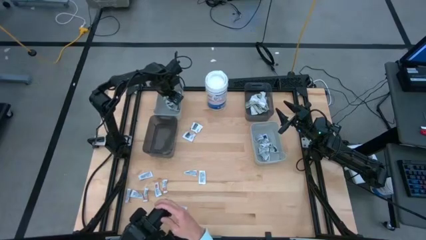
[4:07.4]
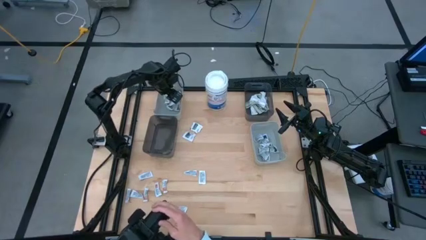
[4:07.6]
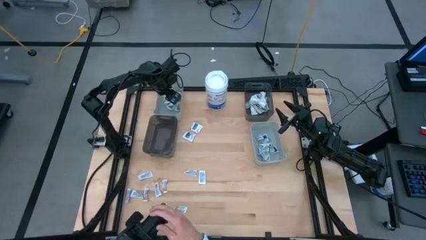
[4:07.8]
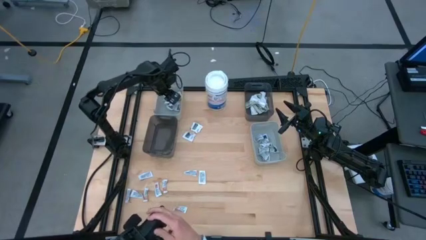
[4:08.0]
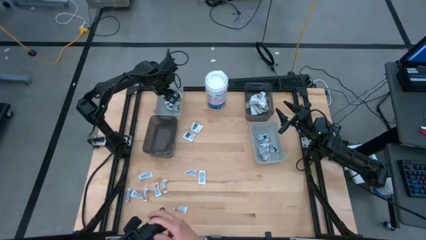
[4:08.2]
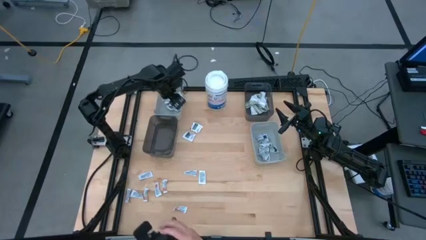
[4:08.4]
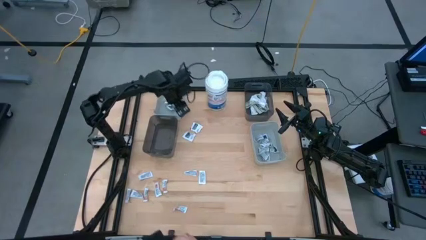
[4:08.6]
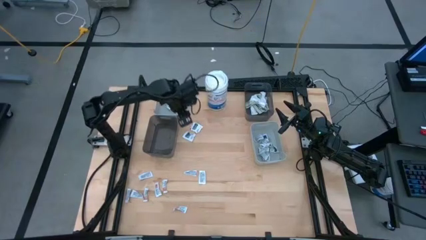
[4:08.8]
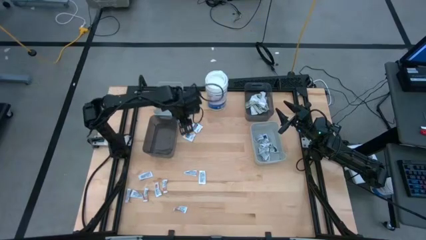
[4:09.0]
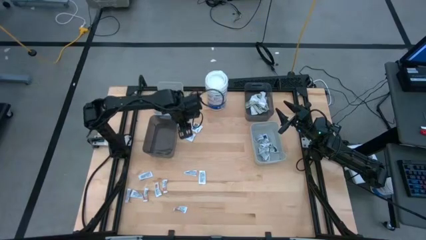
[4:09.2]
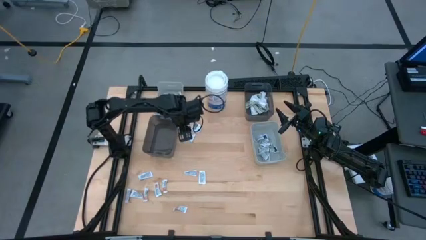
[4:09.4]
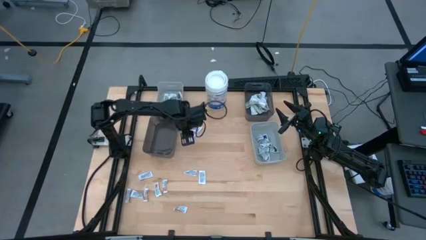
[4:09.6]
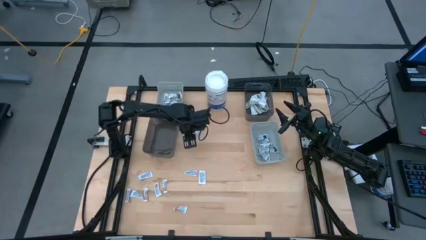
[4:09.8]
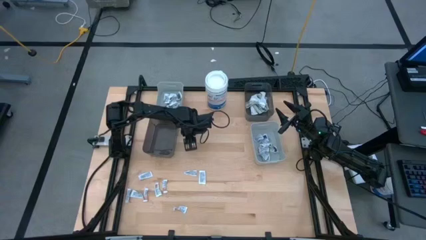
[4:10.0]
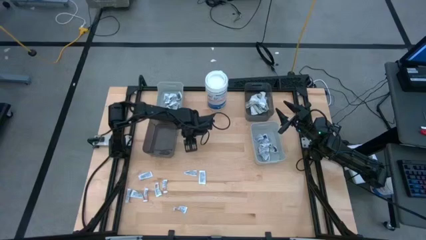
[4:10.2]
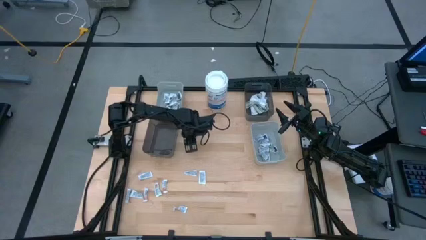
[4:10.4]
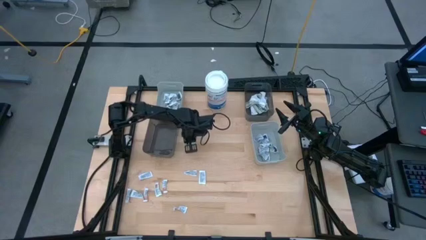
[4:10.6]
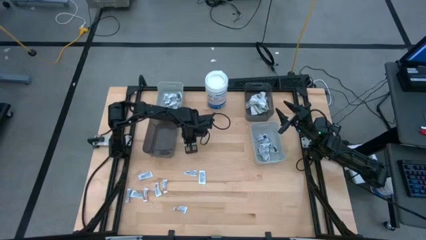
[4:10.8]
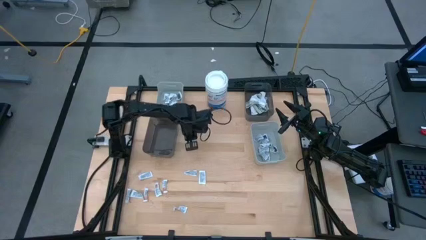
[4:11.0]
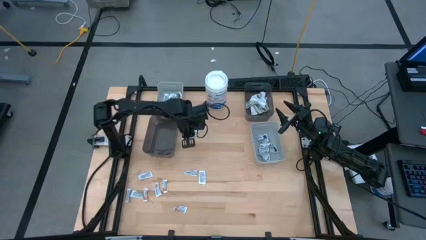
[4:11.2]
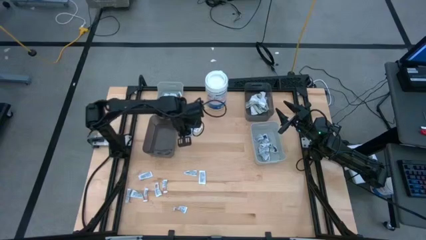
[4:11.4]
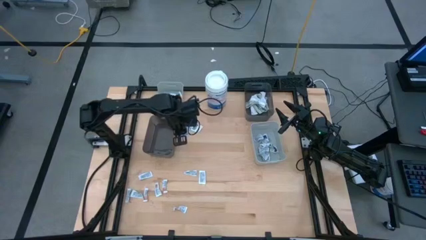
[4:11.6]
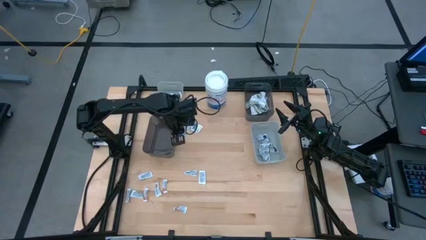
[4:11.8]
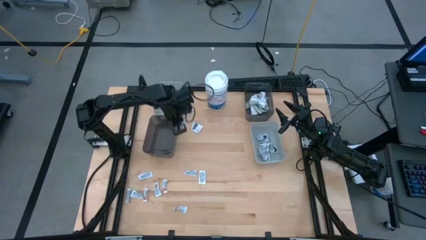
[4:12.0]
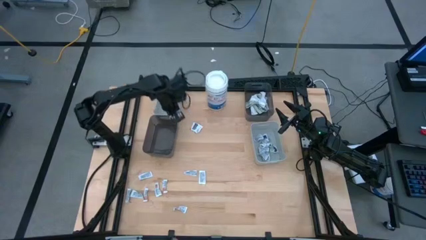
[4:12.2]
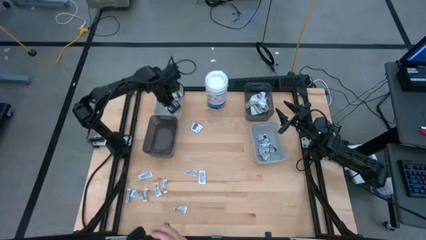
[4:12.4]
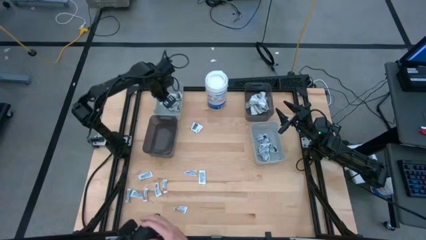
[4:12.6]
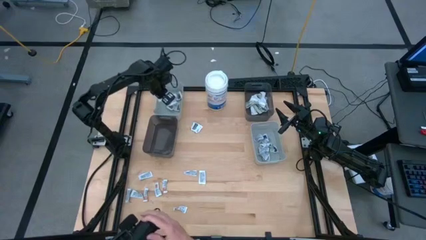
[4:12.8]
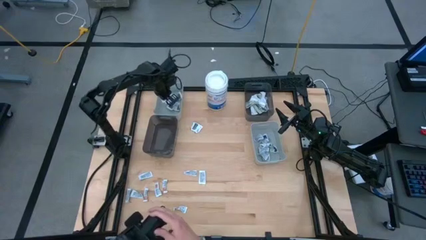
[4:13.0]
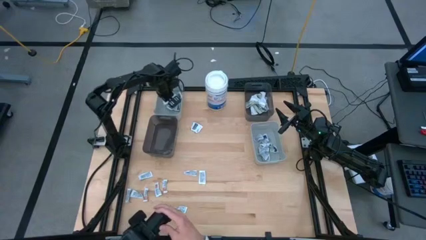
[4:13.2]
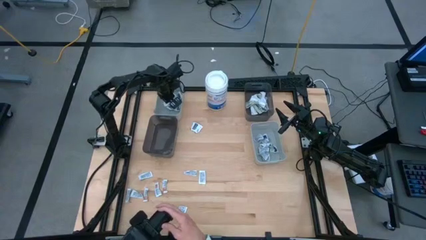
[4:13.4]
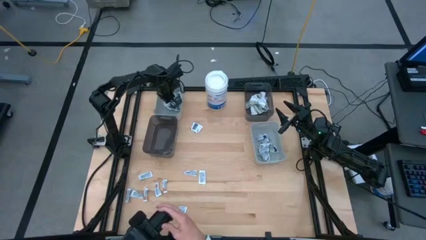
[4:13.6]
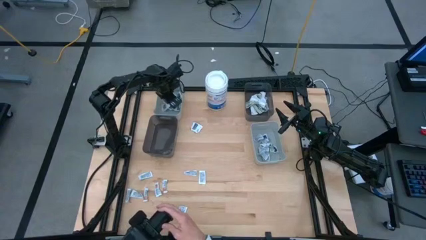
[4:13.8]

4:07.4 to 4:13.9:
Task: Pick & Place First Aid Supplies
Put the gray towelette pack into the left gray bin

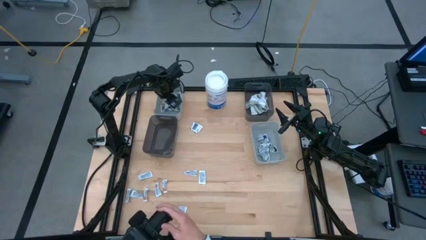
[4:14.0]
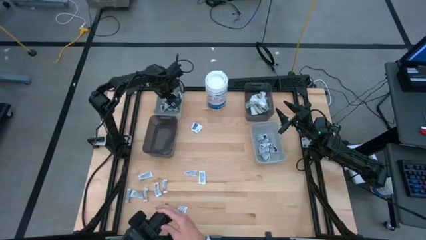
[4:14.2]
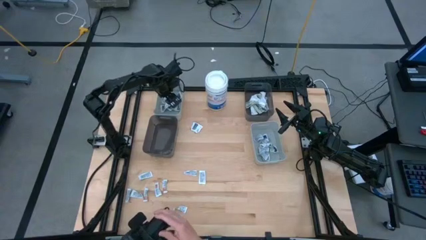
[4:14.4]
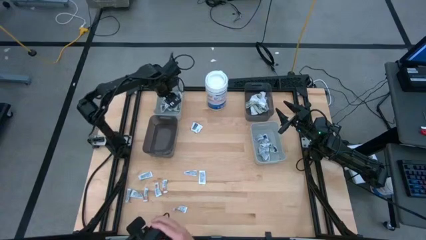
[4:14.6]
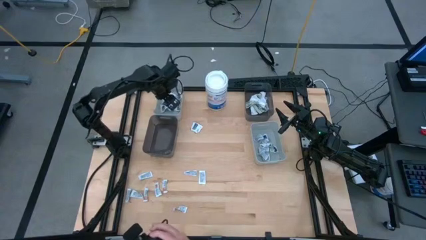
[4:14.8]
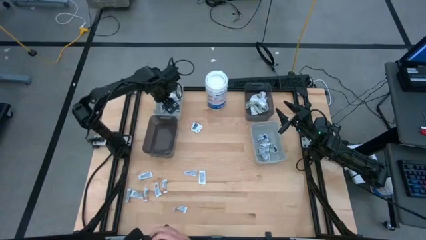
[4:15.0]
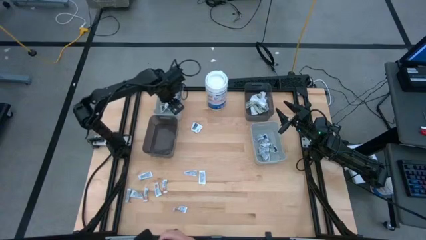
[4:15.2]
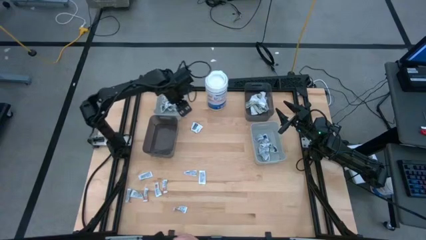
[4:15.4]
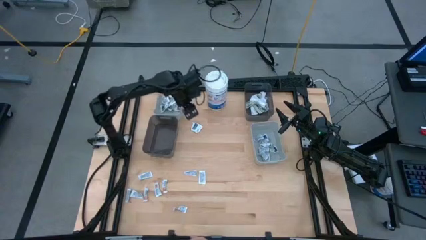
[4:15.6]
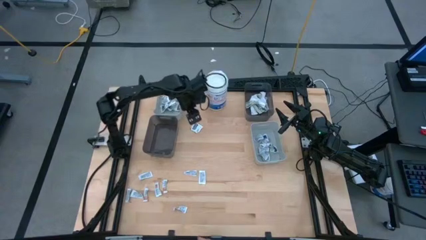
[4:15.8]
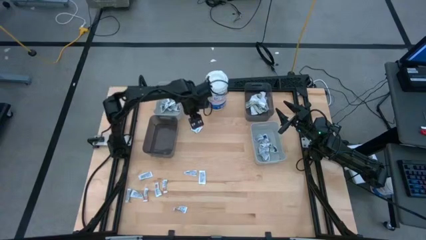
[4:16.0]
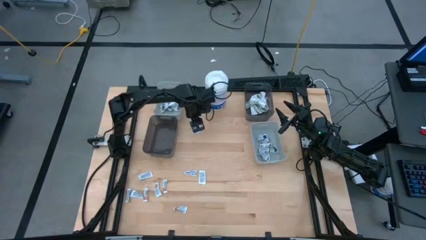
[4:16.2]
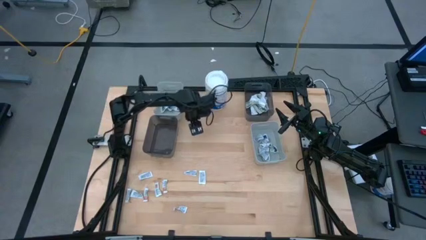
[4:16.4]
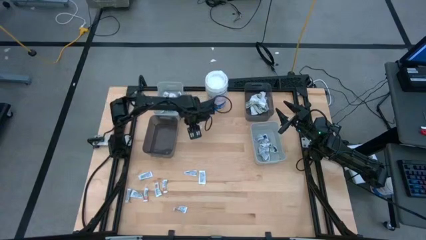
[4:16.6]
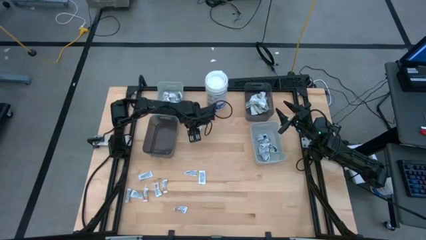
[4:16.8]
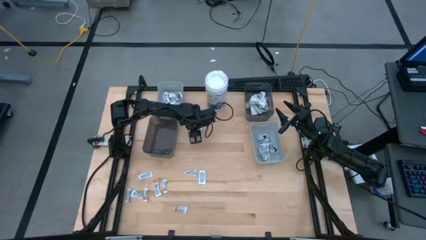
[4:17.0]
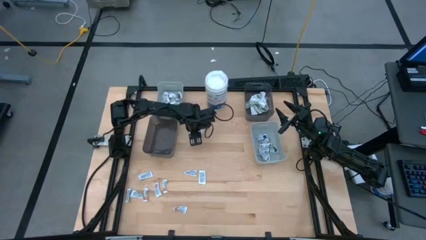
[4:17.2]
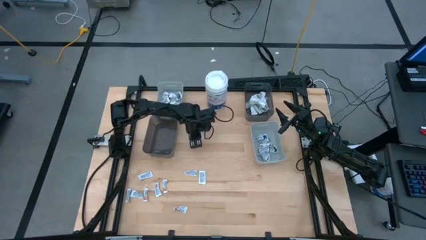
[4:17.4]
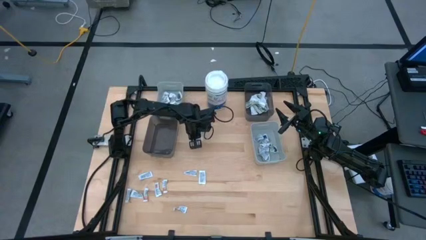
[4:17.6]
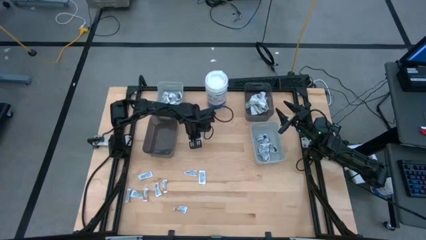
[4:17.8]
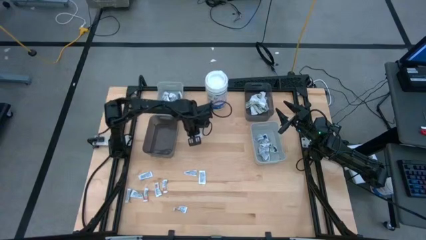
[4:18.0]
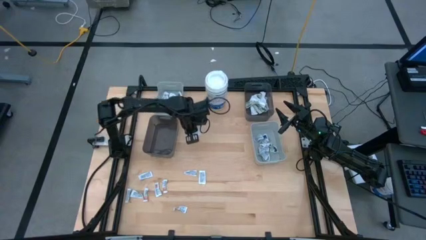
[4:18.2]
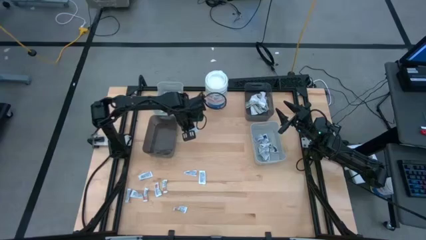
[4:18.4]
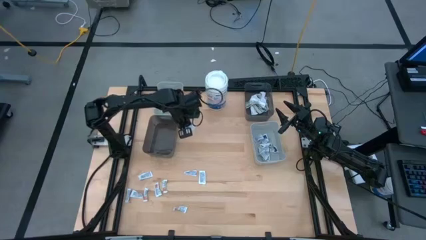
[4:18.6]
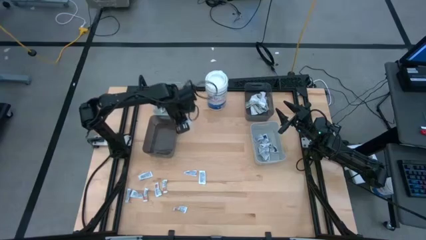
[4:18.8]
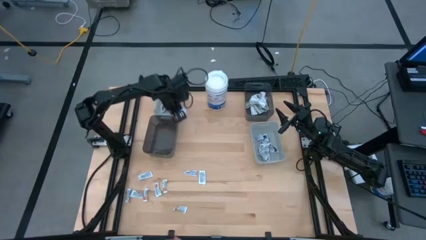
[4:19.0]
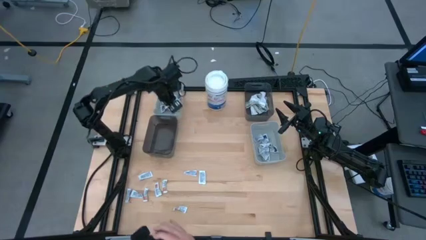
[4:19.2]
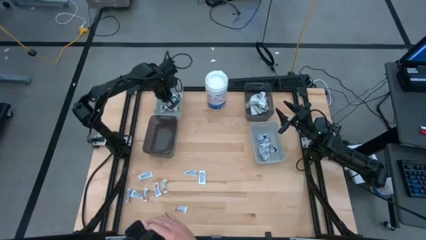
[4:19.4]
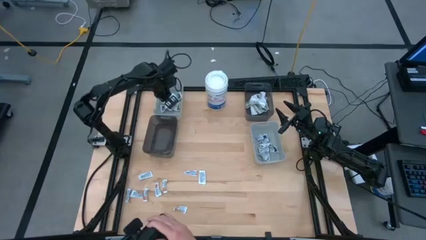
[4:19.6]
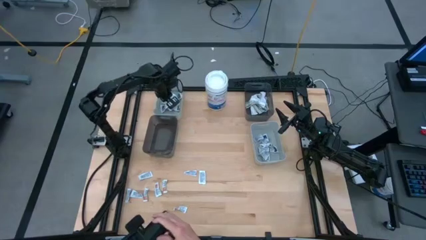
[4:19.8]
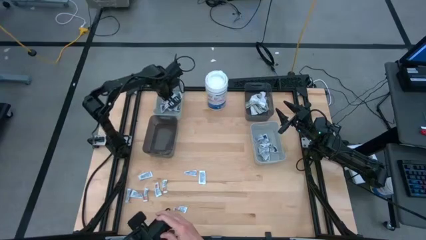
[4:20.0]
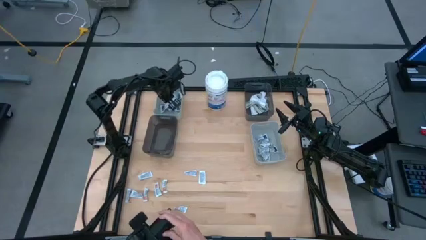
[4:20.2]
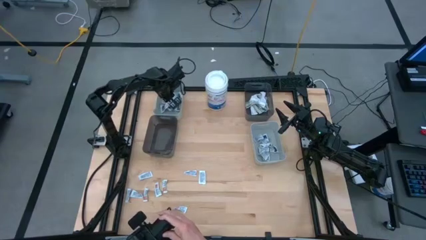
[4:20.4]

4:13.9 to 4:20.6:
Put the gray towelette pack into the left gray bin

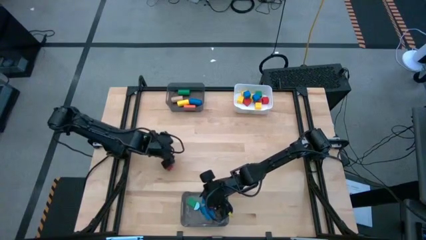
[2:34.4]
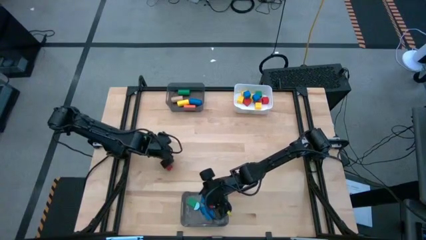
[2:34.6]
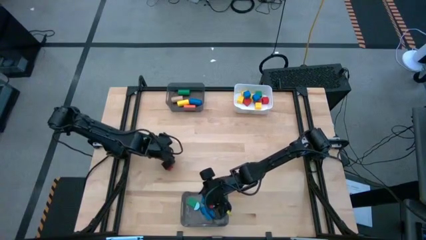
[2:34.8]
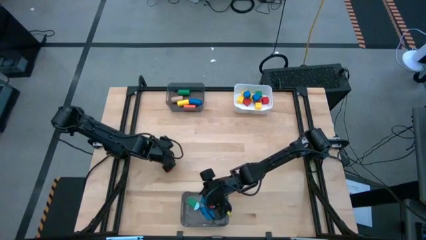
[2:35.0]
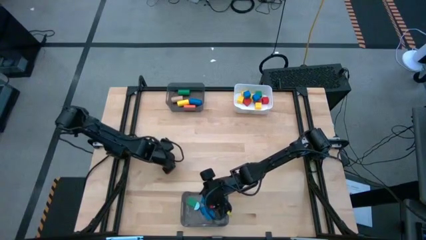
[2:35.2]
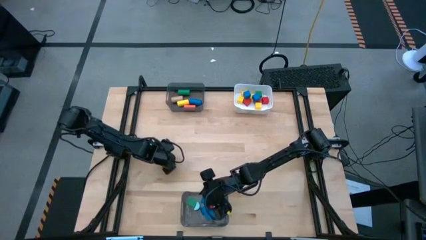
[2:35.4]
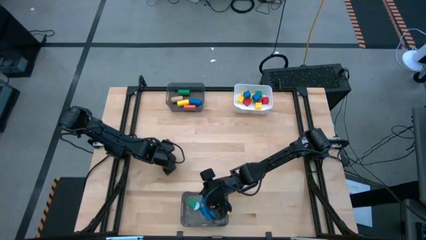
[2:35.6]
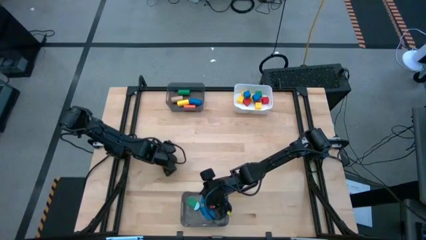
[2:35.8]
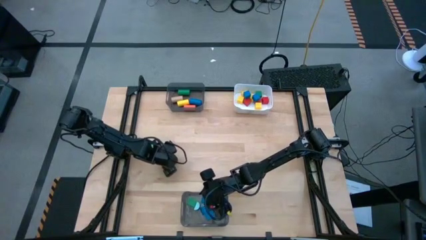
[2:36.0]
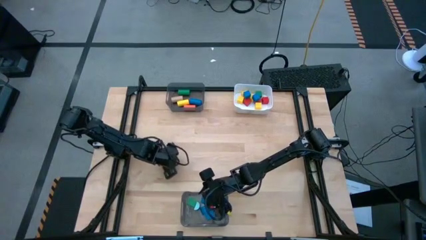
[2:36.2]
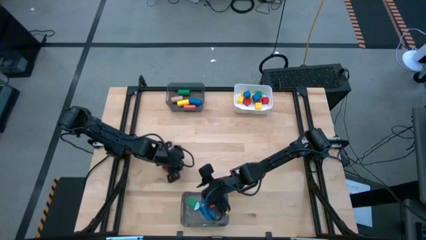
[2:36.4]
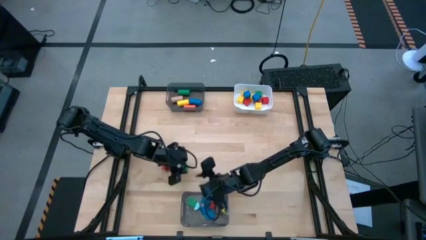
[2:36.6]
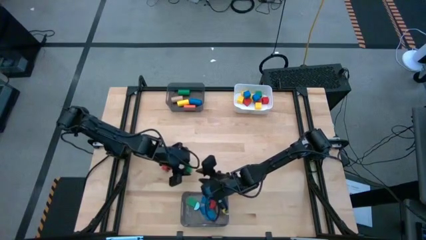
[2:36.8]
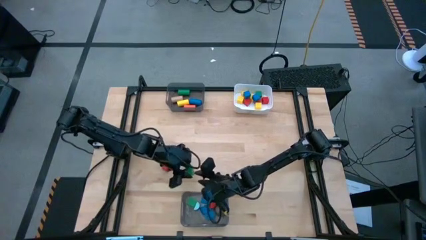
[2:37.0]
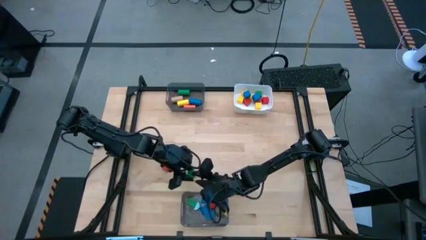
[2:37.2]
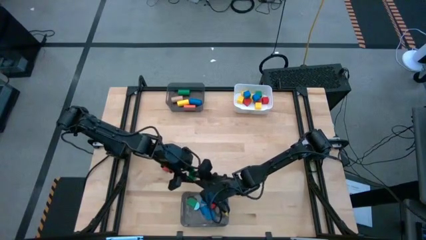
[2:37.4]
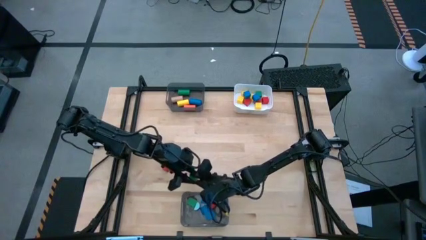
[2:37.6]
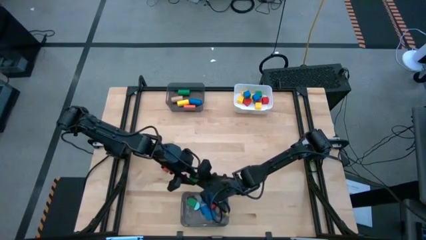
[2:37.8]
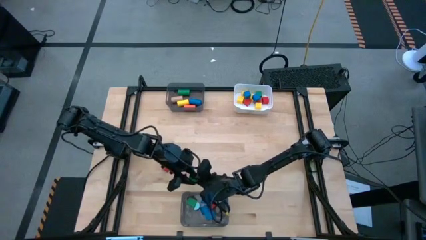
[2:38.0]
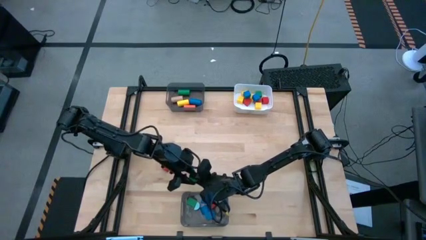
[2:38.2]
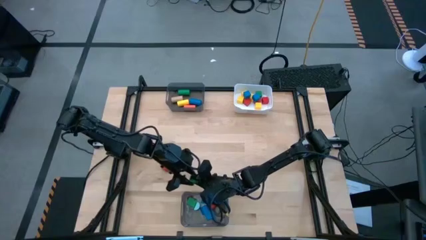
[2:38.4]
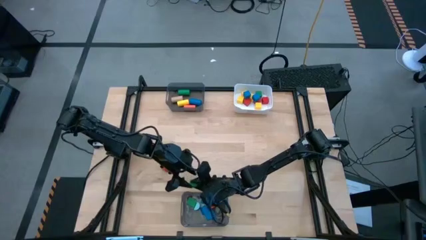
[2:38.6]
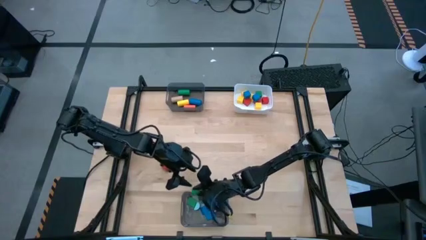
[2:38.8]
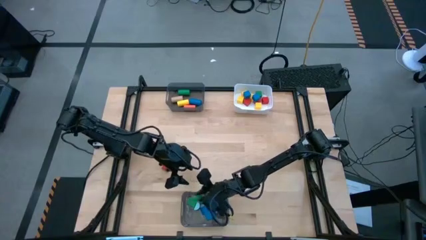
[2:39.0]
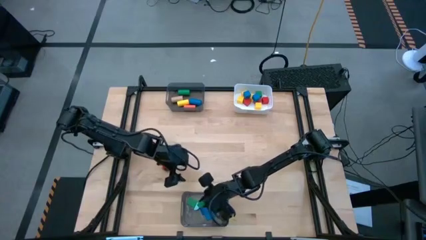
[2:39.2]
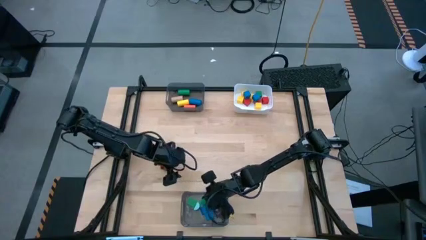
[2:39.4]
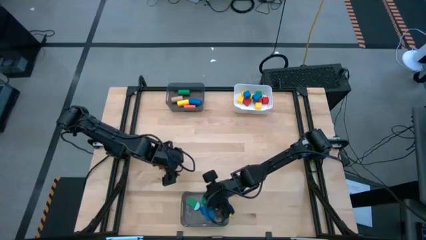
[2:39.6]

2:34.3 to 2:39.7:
Task: Sort blocks by size
Put the green half circle block into the bottom black bin
